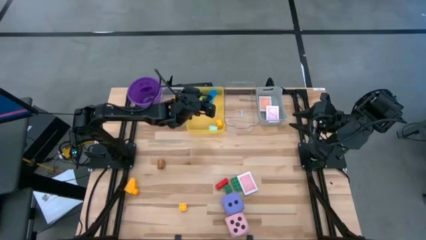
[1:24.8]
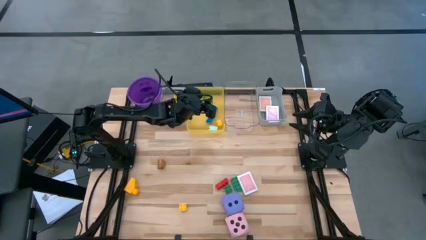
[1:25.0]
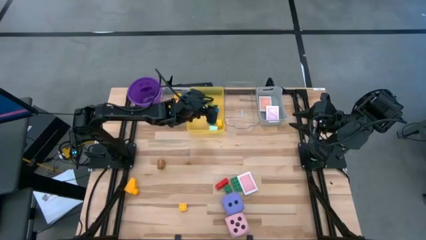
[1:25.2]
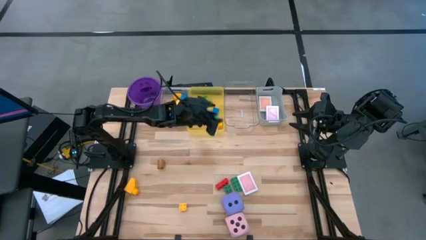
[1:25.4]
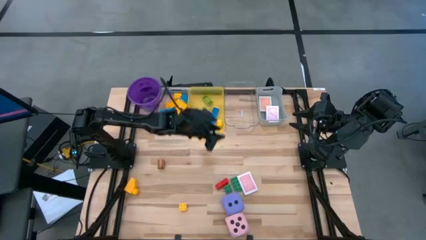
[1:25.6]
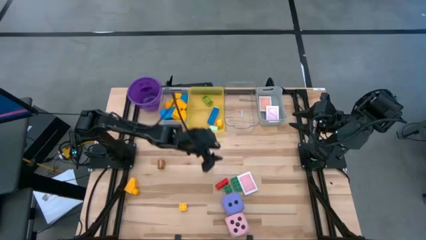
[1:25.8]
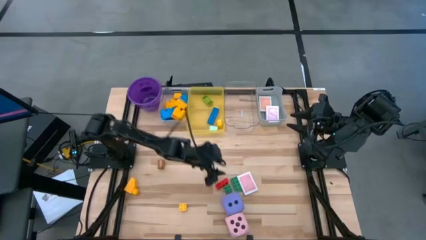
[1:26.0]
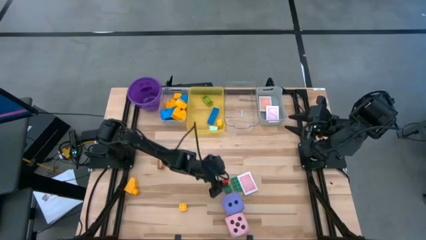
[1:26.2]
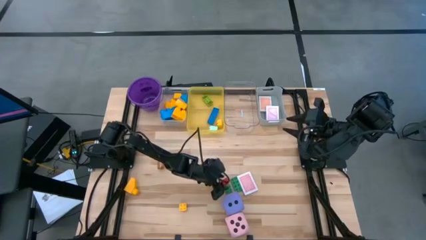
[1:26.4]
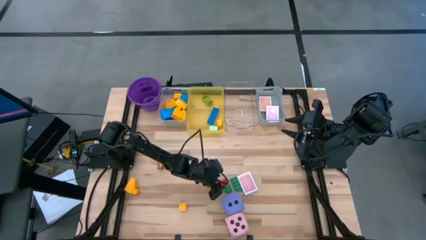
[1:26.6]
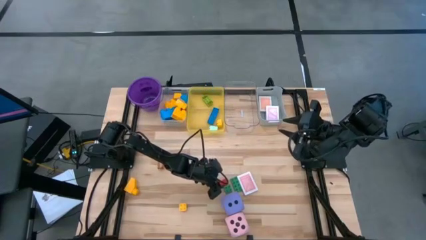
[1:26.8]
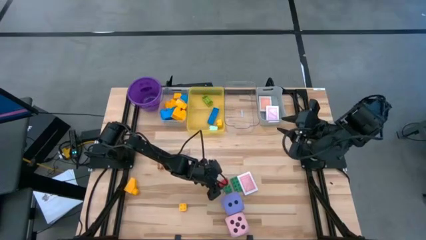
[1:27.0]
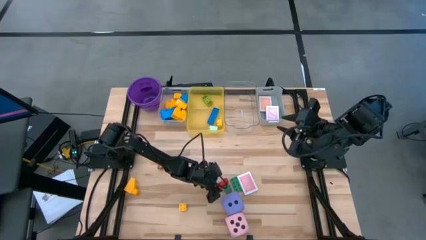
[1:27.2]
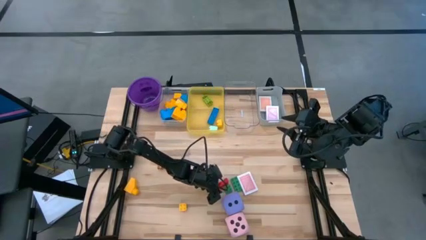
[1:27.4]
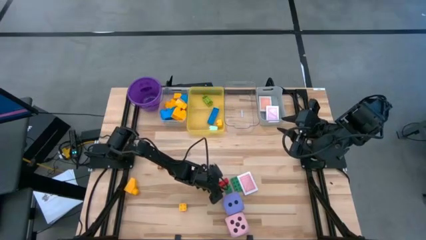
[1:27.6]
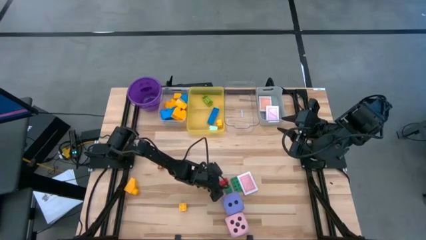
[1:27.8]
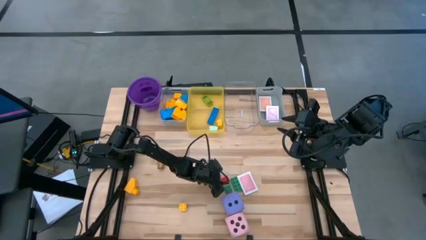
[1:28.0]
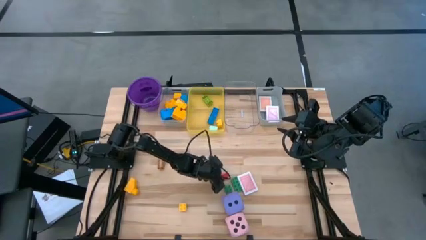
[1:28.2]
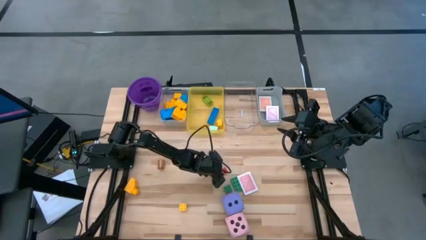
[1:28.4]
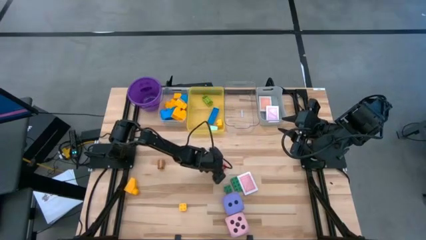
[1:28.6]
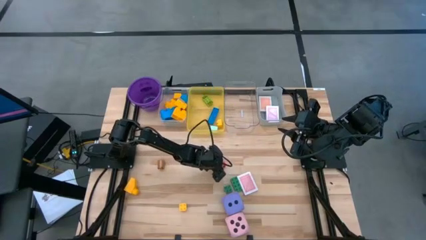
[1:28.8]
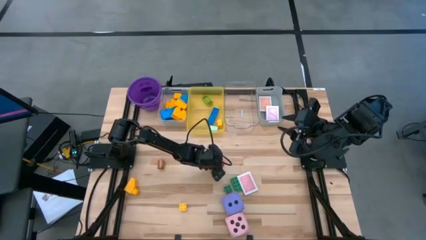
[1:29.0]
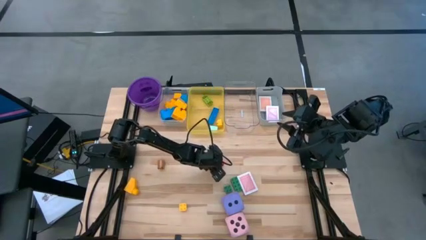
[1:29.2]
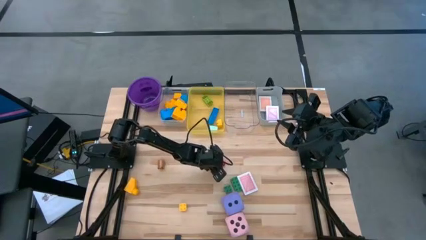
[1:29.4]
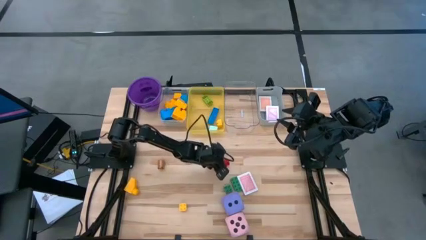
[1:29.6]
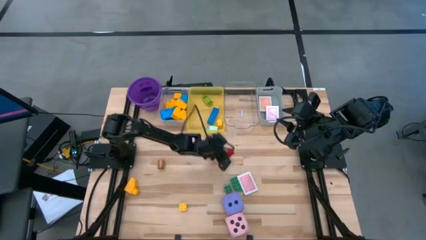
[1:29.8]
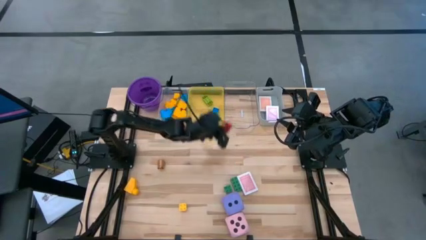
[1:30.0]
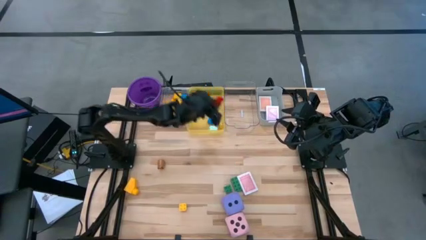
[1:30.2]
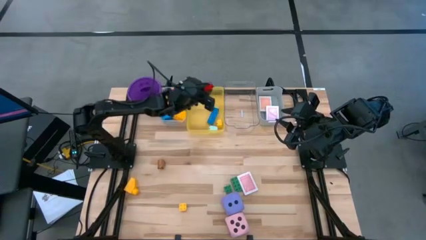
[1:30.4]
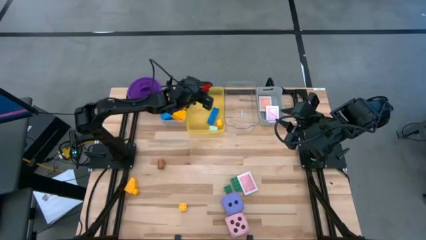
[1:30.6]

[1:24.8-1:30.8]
Task: Pick & Place Toys
Put the small red game piece into the yellow bin

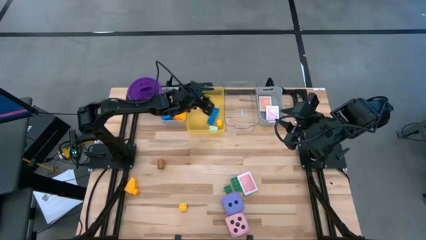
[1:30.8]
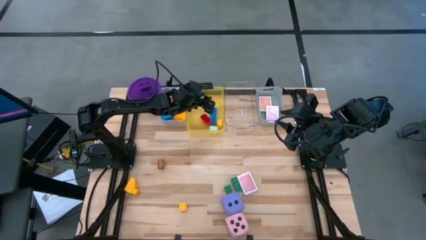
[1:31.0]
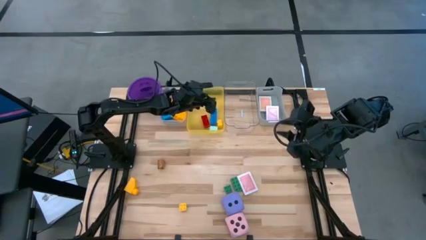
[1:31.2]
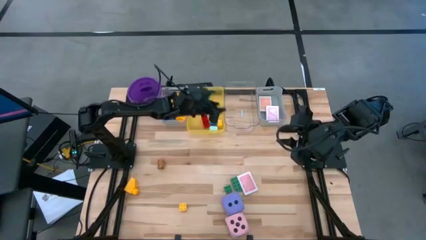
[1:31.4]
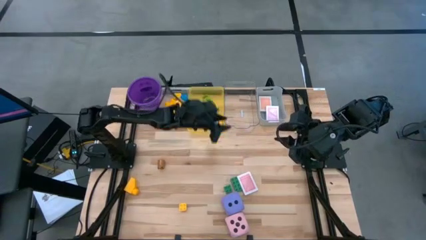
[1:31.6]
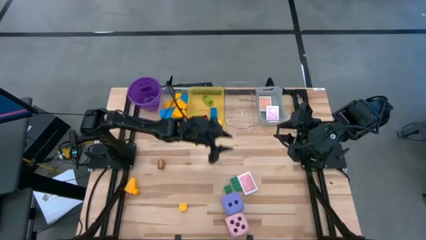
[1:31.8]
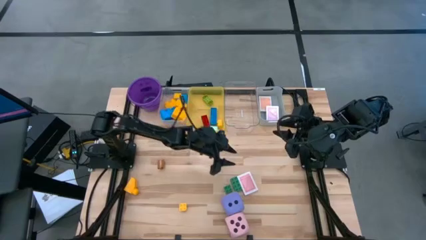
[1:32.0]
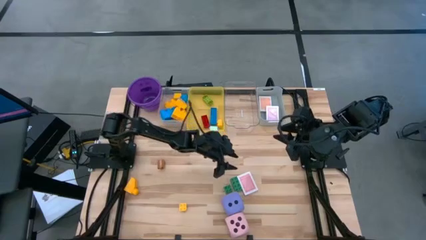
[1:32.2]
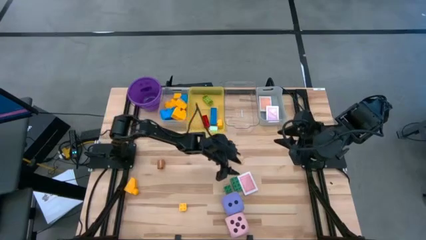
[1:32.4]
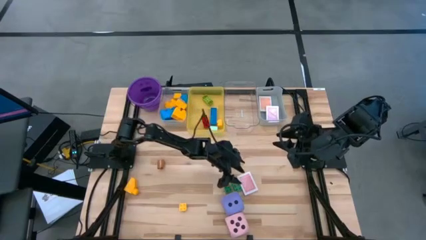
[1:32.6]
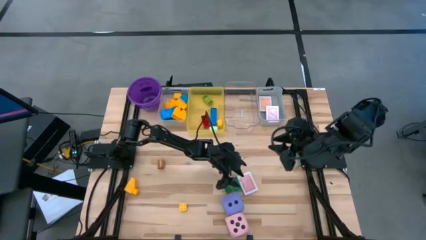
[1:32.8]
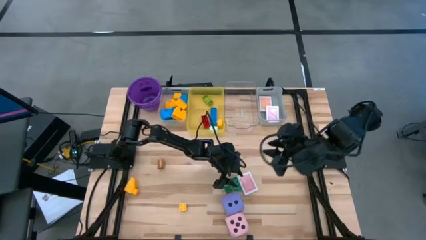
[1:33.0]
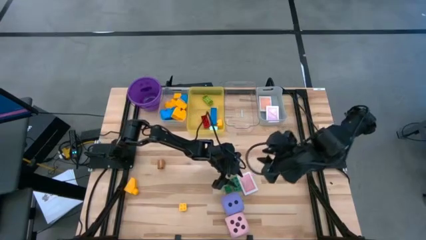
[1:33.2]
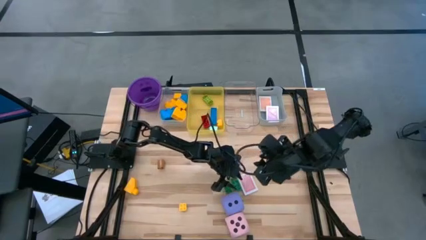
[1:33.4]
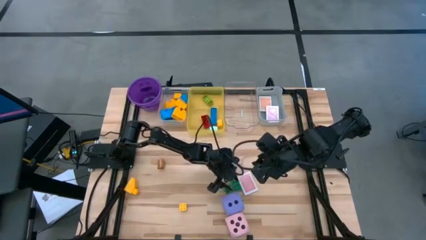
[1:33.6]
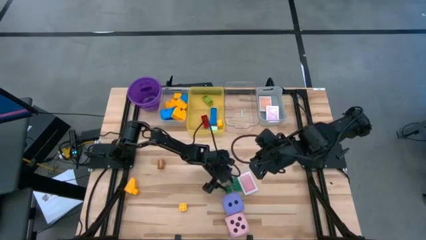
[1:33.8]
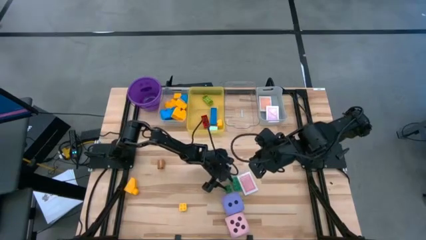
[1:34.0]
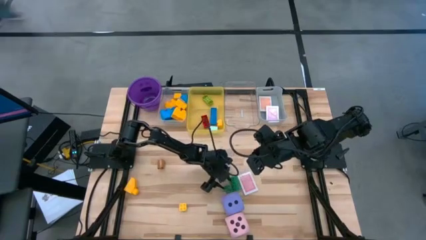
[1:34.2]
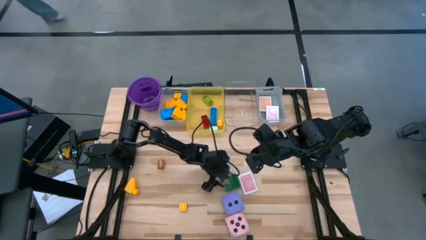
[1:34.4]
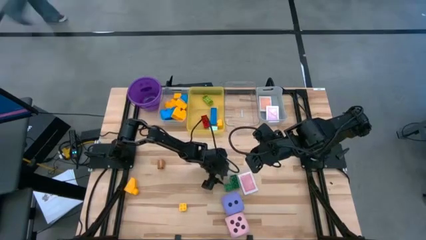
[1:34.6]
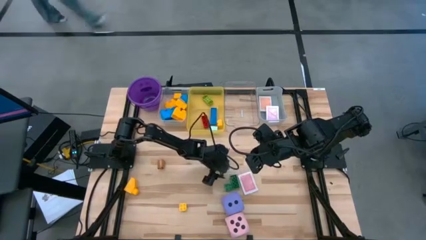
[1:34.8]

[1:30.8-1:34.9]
Adjust the green game pieces

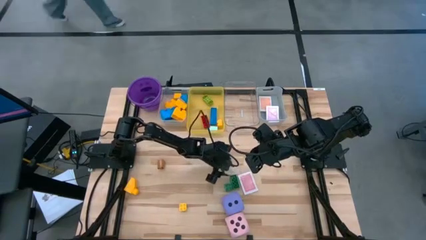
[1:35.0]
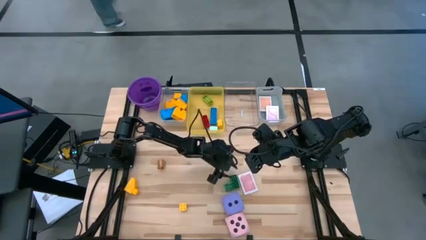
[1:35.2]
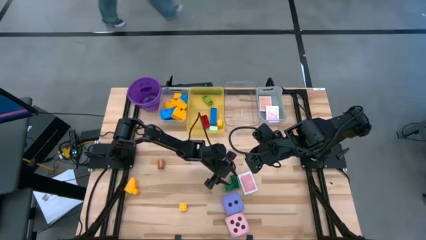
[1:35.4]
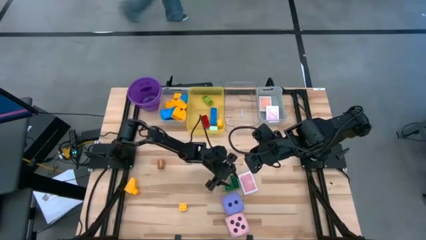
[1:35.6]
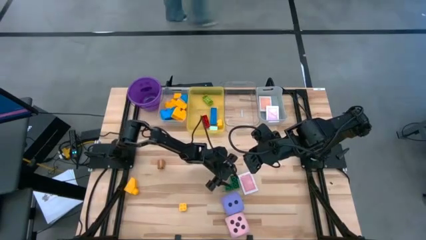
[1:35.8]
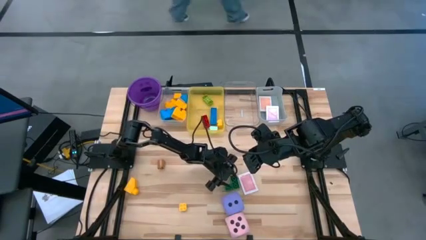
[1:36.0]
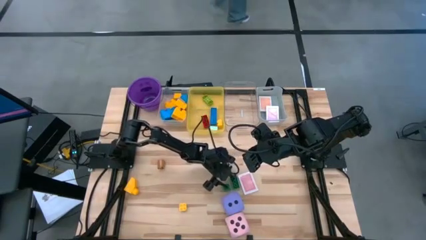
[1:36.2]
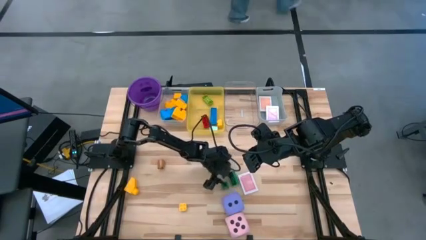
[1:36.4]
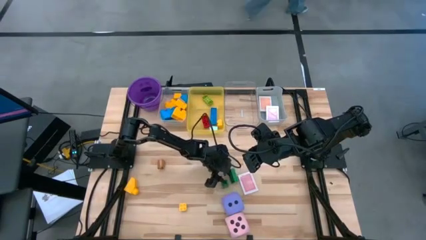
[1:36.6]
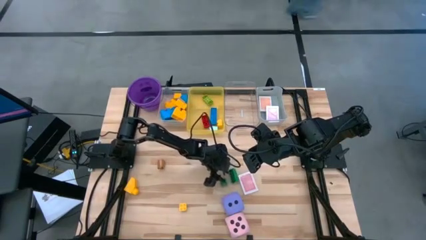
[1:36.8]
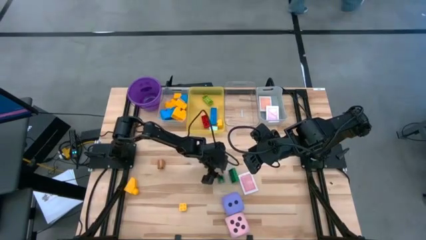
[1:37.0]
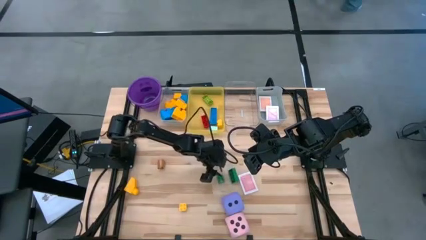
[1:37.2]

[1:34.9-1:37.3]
Adjust the green game pieces

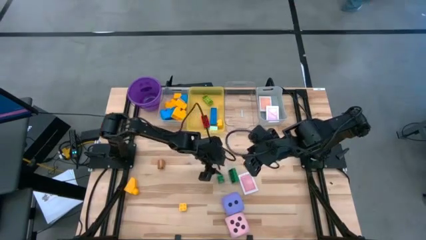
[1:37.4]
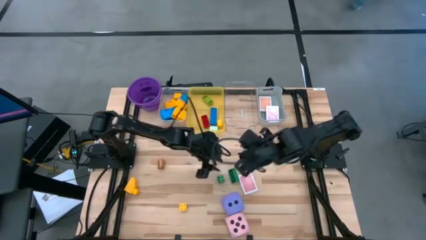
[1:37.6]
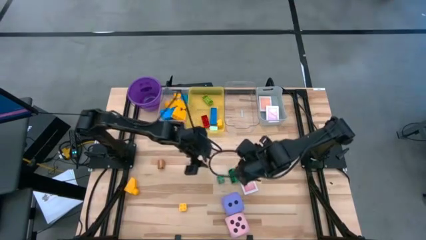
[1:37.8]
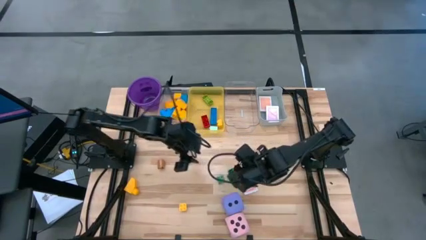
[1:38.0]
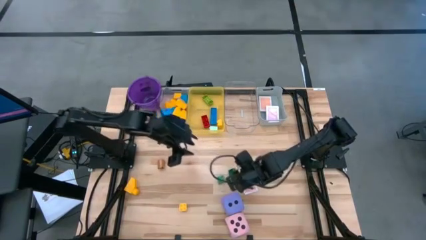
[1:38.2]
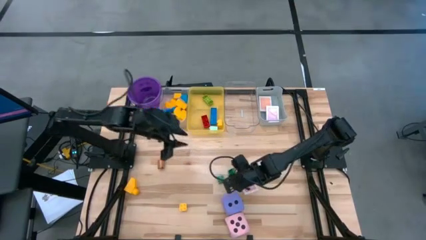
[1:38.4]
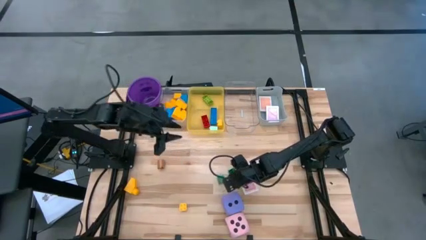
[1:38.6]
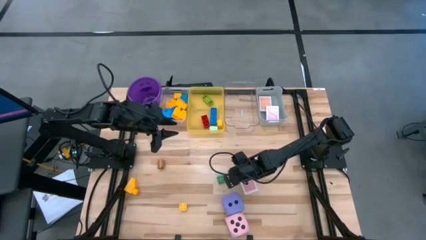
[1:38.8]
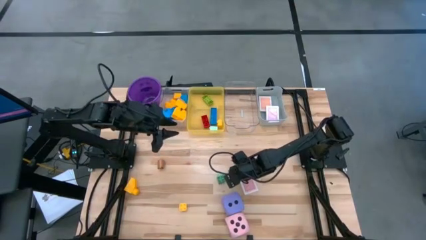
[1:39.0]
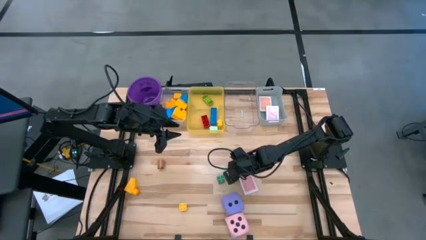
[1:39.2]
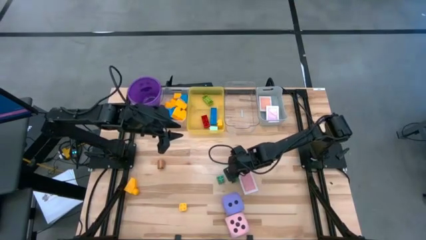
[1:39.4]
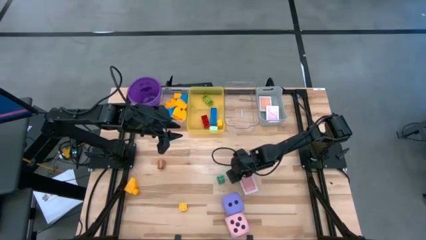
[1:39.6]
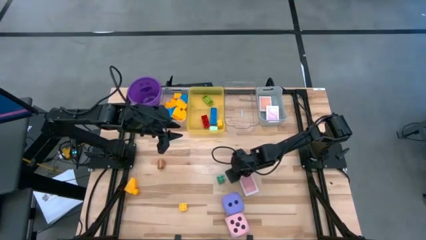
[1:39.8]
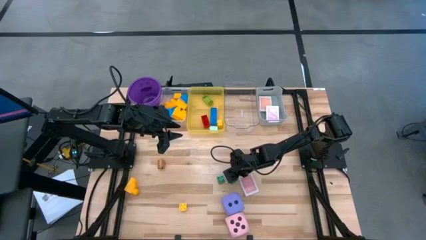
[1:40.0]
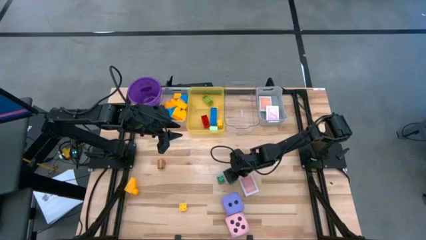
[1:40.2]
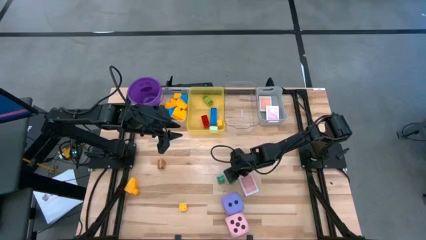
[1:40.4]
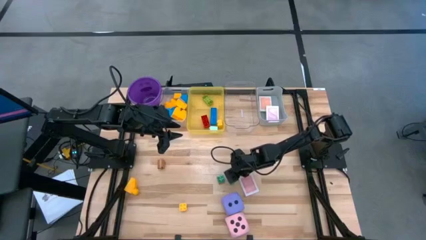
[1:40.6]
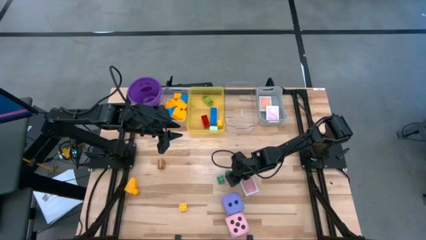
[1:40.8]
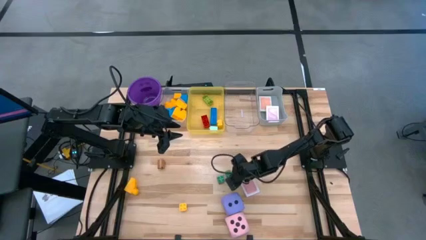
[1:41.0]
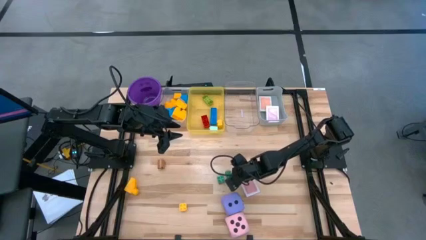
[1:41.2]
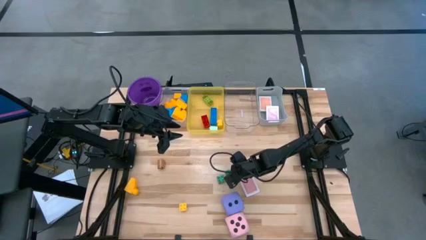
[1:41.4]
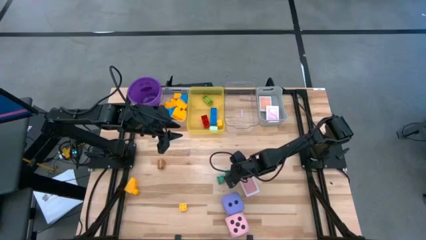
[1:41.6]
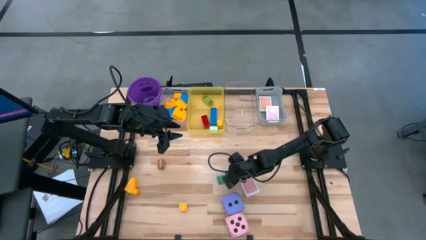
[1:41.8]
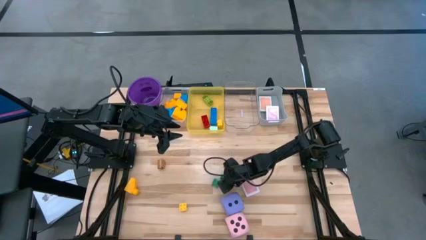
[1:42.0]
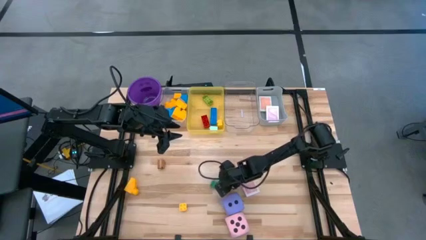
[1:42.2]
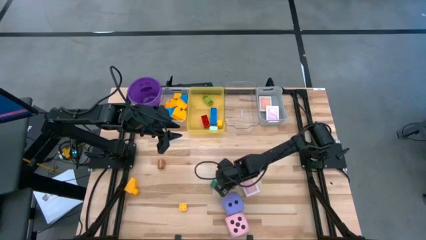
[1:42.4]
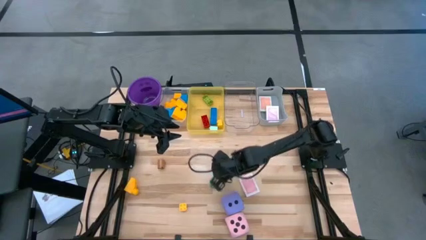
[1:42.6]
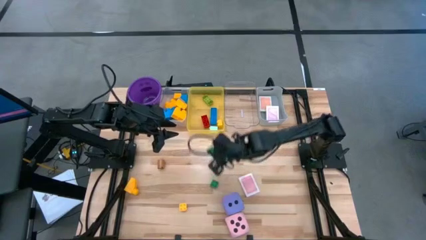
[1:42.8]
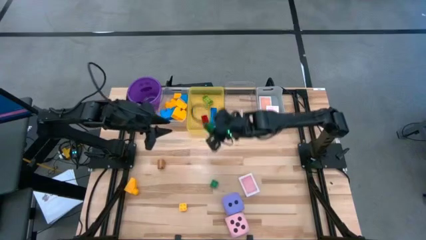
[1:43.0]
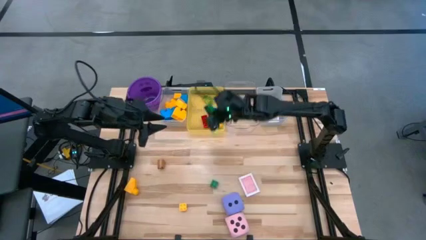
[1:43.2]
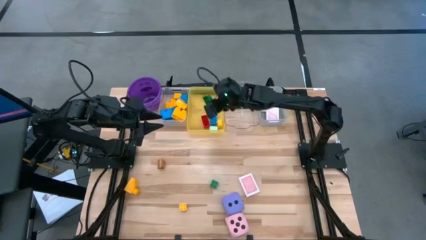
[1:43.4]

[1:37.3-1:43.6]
Put the small green game piece into the yellow bin
